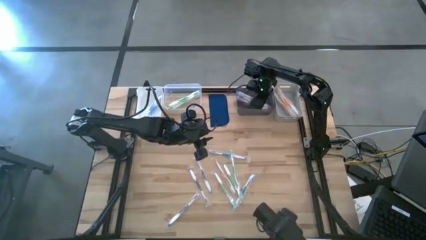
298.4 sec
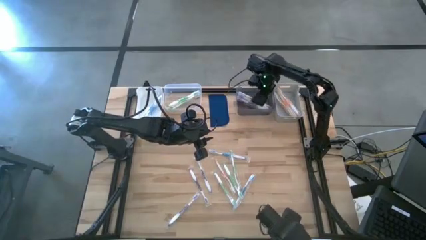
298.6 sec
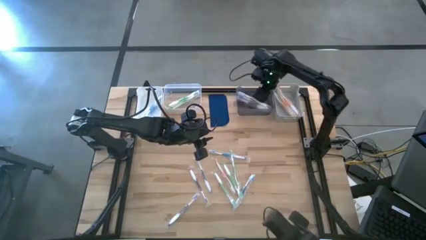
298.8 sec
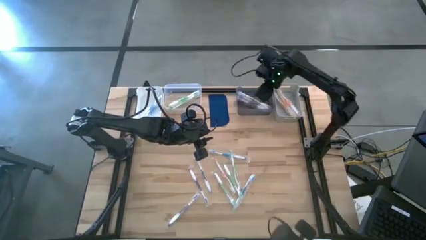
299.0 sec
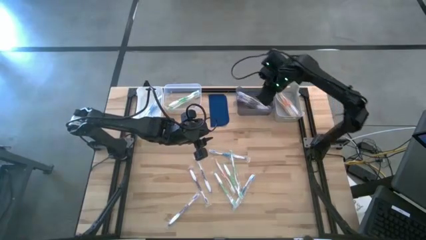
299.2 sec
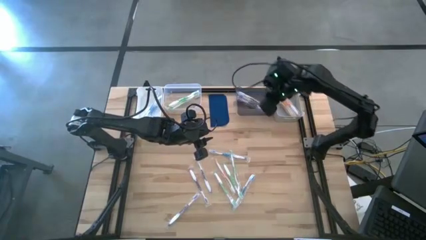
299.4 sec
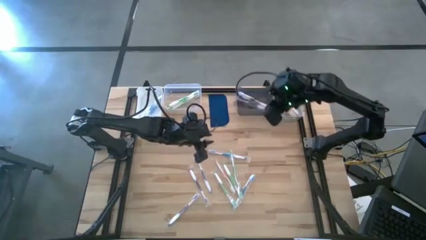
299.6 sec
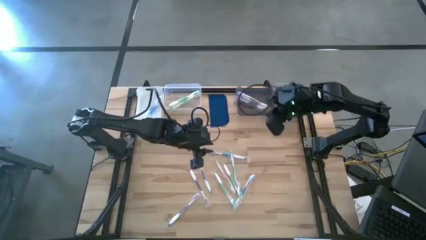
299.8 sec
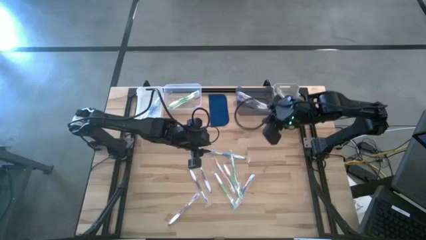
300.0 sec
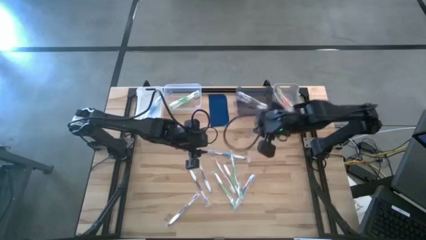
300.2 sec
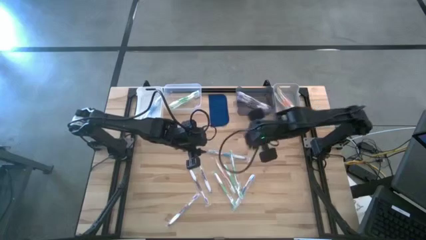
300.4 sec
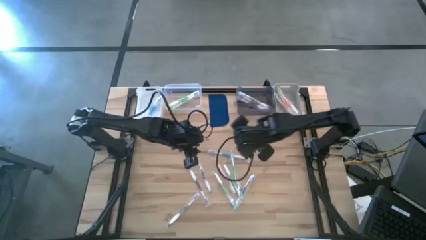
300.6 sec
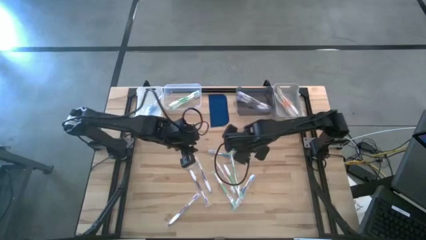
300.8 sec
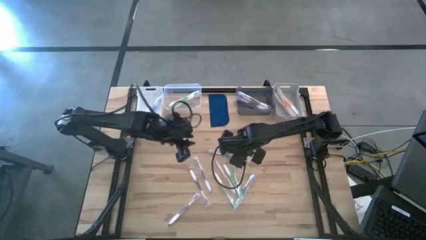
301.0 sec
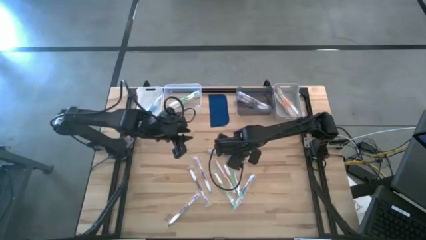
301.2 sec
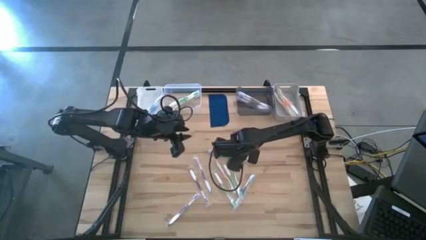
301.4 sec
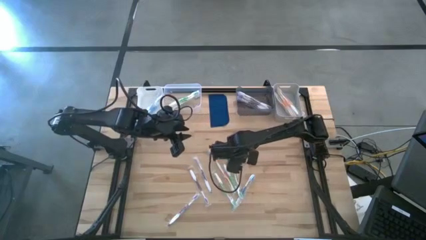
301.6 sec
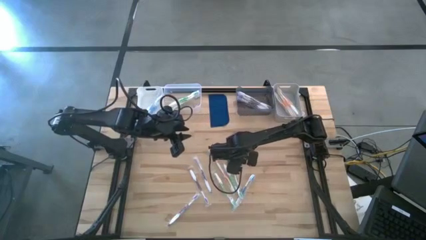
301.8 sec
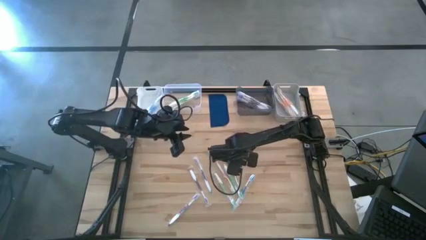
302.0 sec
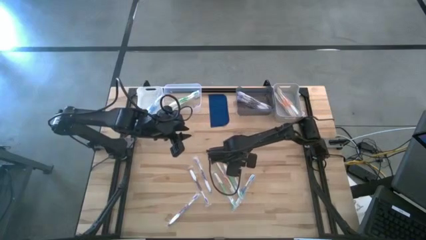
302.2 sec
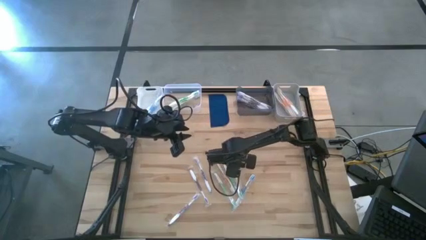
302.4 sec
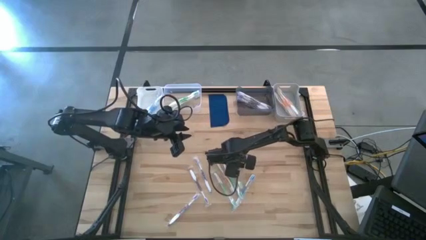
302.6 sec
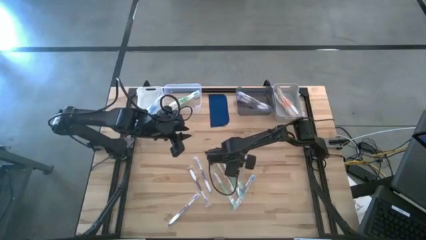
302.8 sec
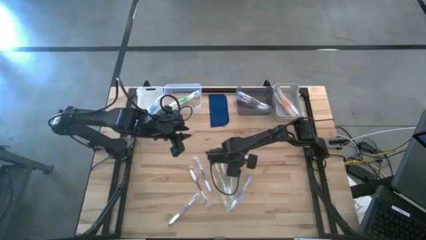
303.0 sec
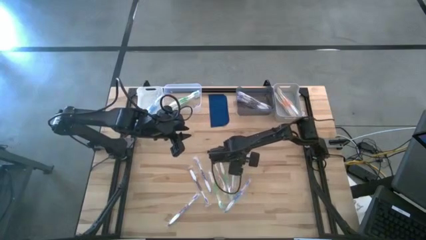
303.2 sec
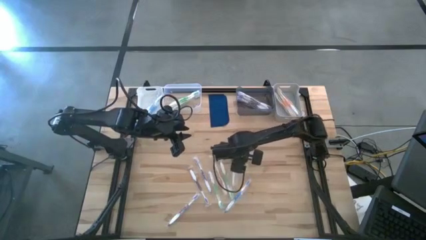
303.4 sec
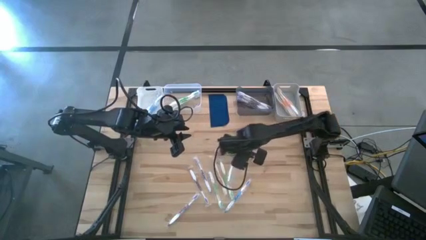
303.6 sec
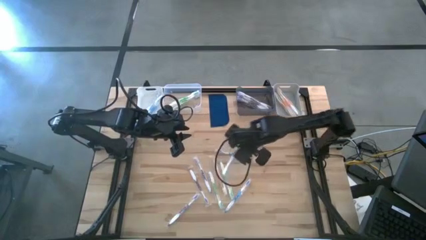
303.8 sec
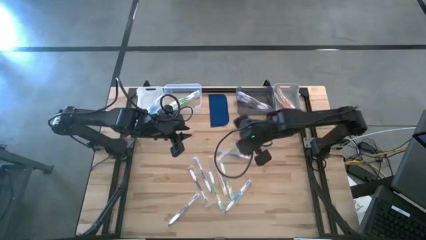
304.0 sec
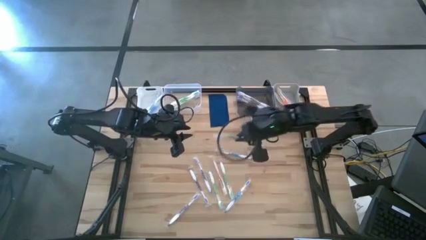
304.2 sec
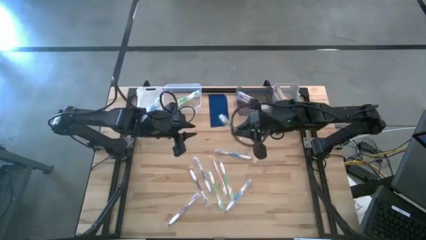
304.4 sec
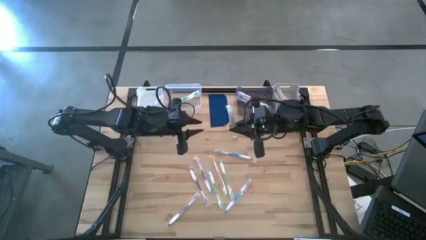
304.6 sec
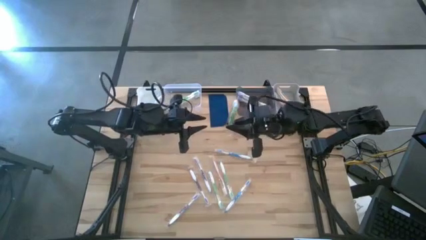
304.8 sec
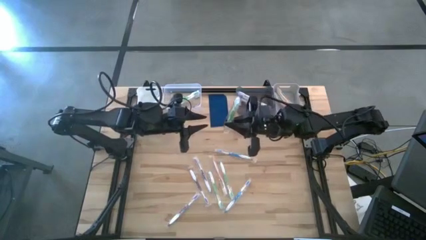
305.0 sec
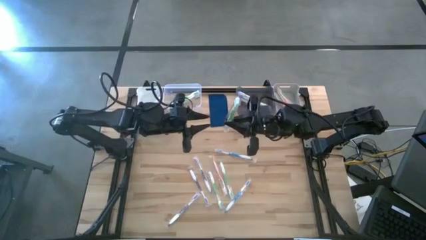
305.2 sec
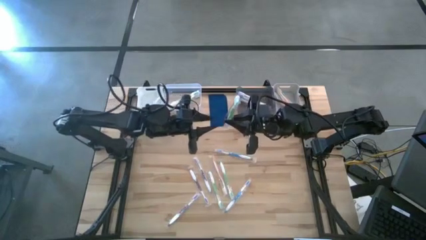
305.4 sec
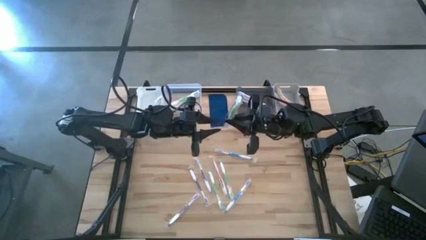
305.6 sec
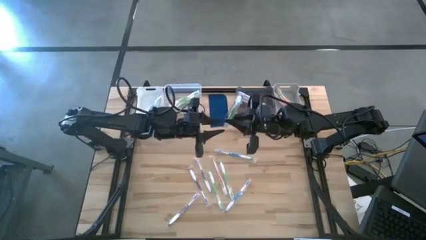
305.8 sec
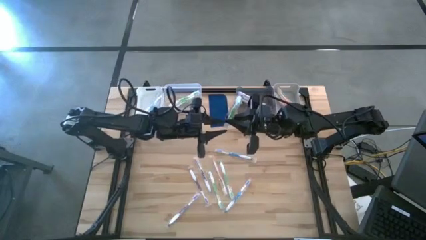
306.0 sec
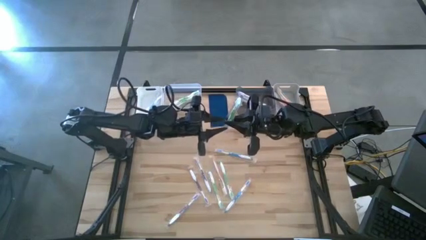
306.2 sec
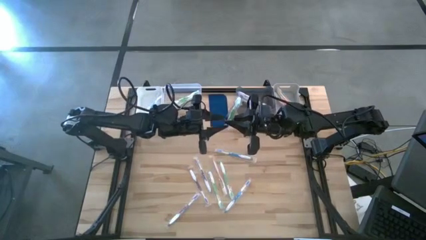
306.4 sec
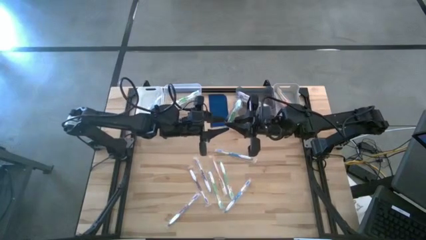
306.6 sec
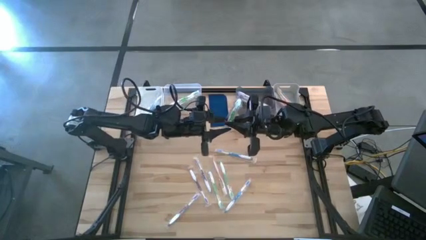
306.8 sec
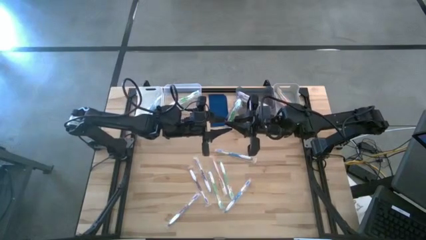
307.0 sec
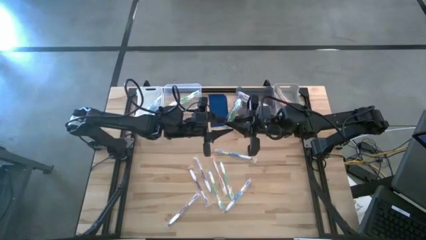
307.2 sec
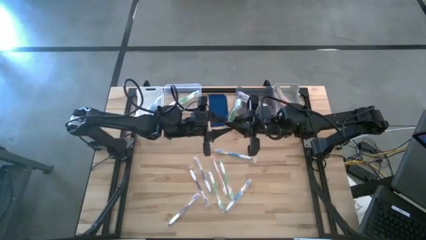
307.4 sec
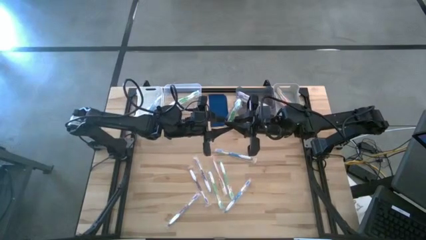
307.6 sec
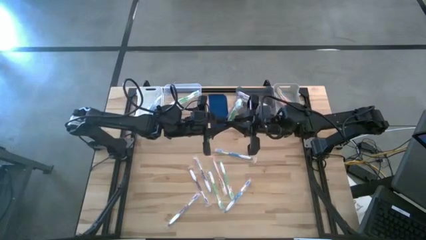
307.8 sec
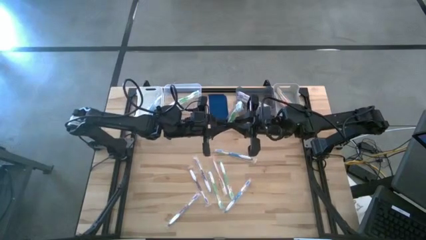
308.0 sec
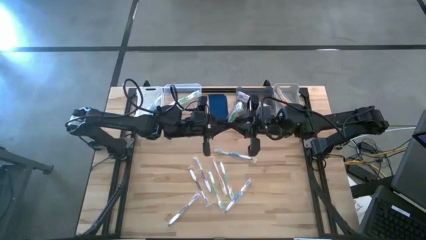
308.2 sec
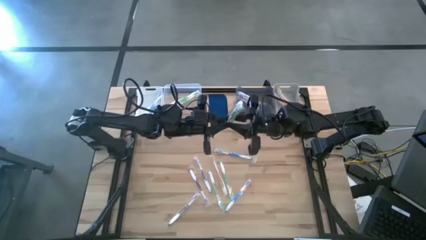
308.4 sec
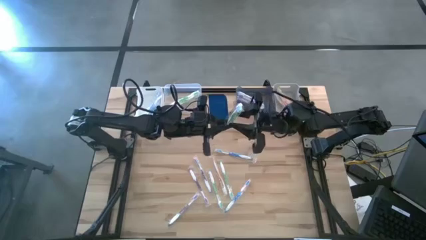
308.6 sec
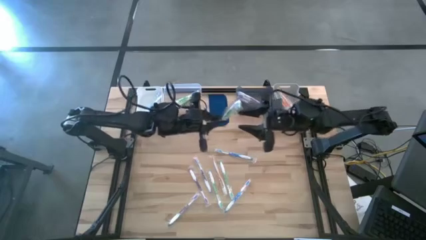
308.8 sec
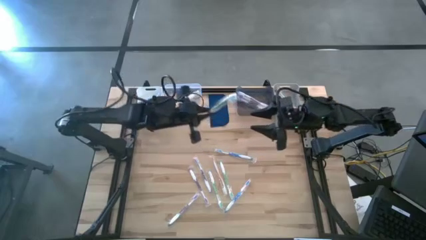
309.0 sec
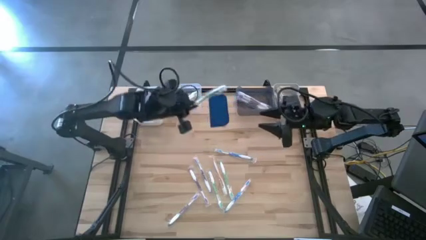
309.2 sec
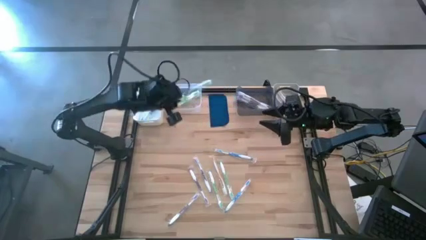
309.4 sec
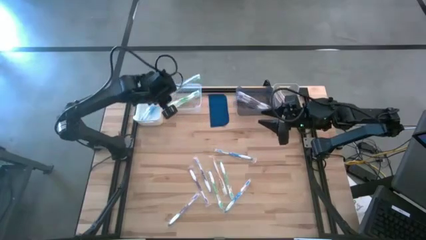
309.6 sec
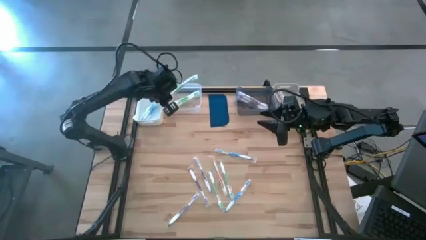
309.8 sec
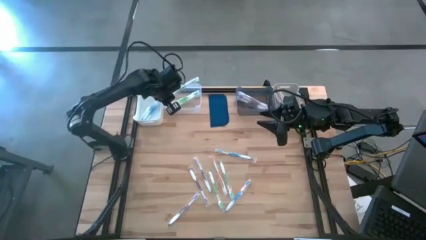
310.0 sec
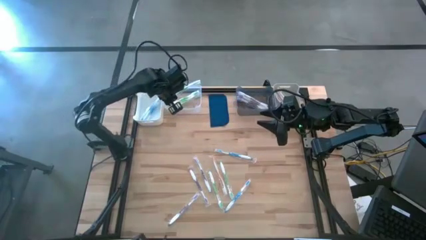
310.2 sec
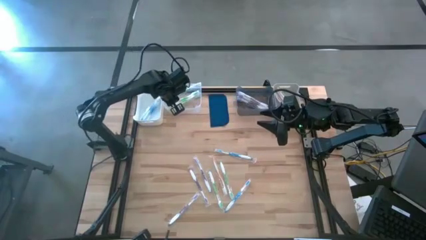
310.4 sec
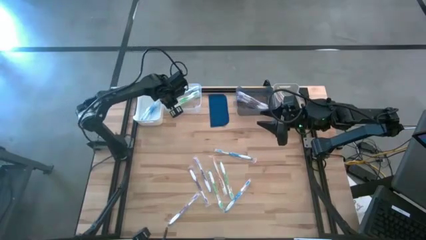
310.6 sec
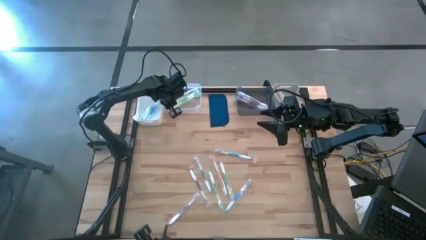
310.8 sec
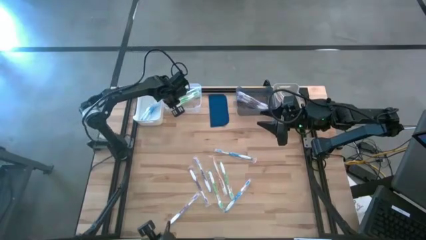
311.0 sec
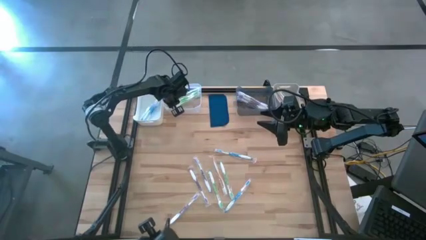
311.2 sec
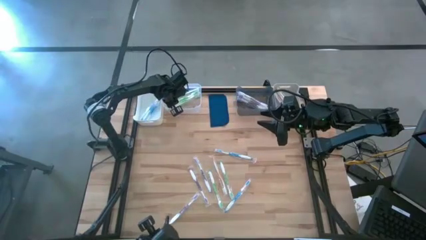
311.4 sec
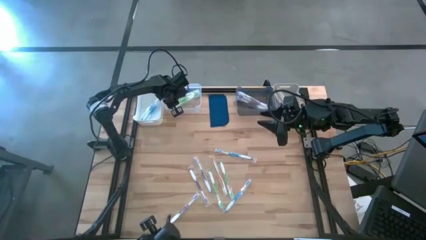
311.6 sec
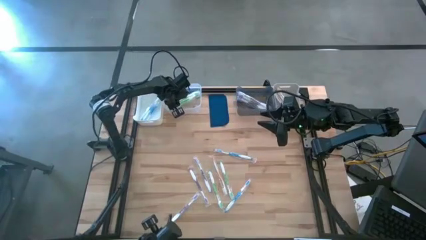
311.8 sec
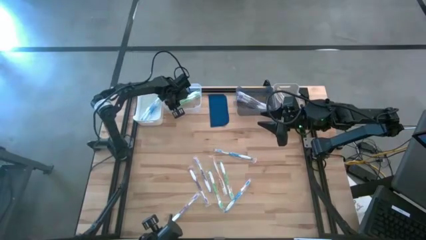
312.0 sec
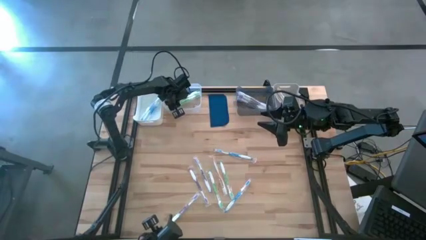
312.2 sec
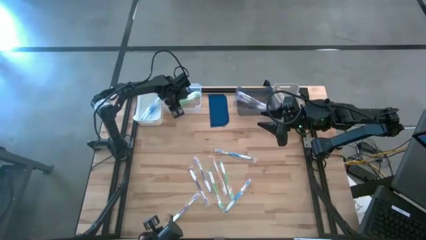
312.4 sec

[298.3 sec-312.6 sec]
Task: Pick & Place Toothbrushes
Put the green toothbrush into the transparent bin

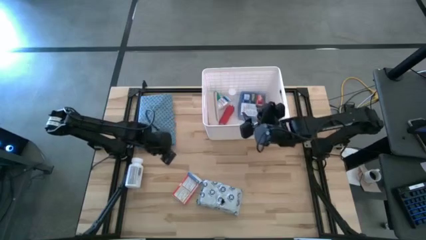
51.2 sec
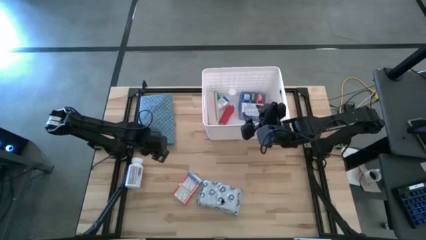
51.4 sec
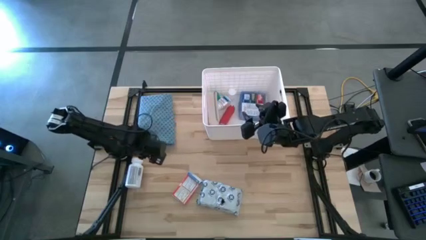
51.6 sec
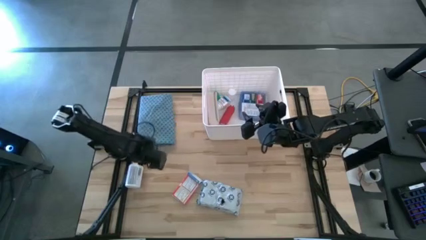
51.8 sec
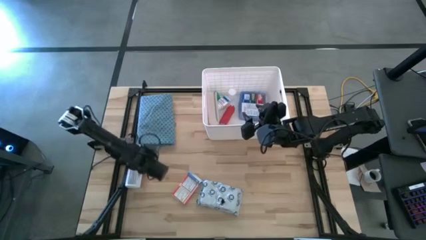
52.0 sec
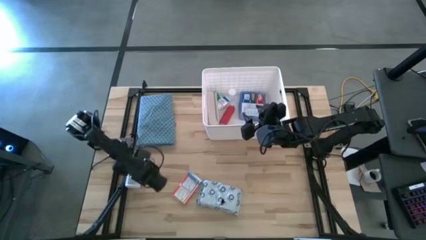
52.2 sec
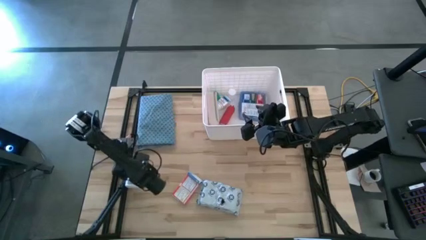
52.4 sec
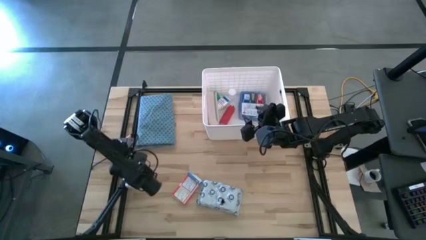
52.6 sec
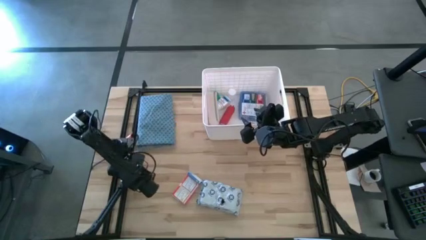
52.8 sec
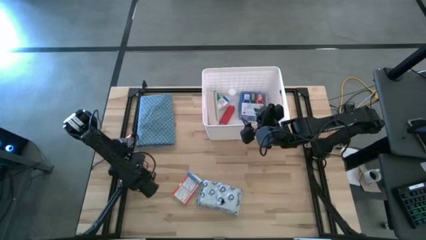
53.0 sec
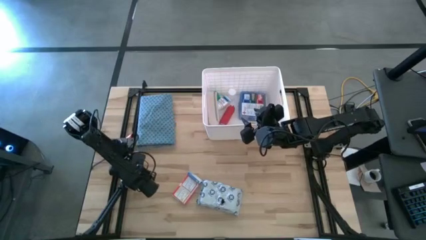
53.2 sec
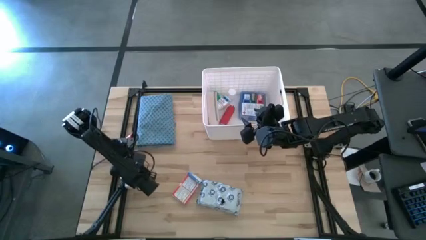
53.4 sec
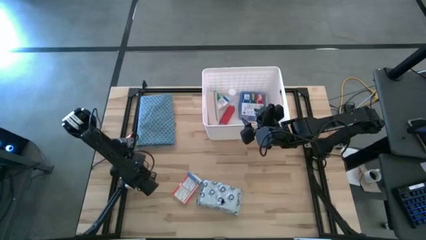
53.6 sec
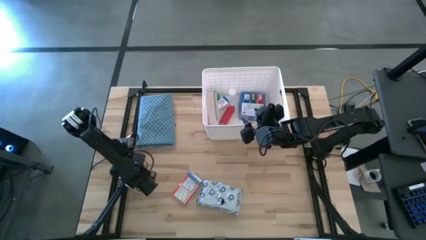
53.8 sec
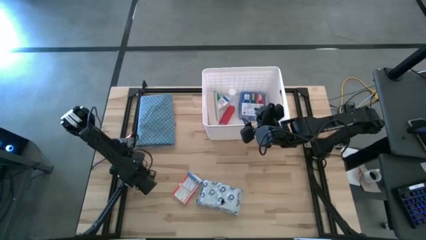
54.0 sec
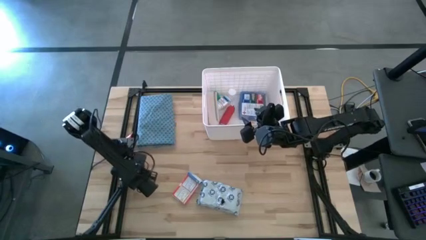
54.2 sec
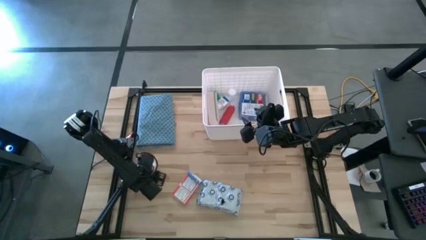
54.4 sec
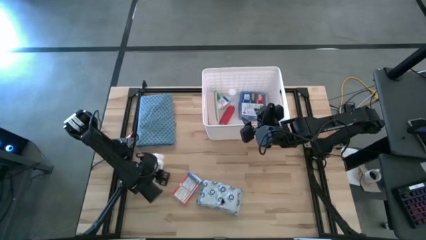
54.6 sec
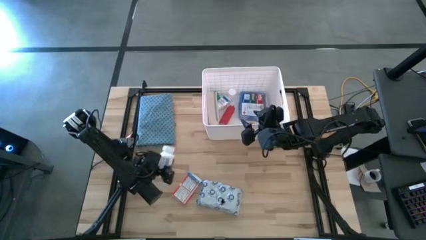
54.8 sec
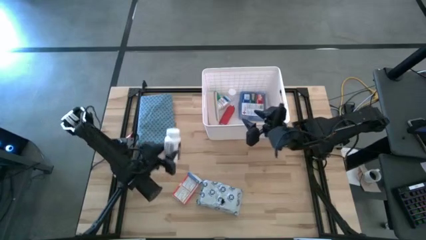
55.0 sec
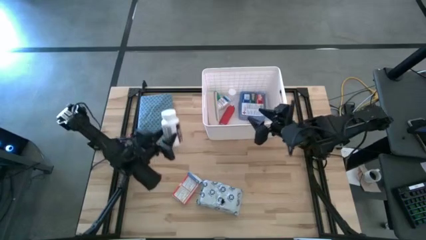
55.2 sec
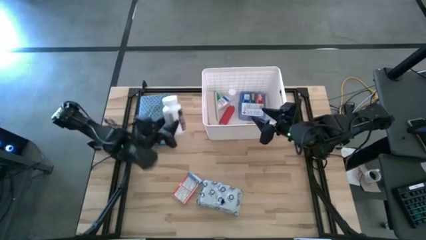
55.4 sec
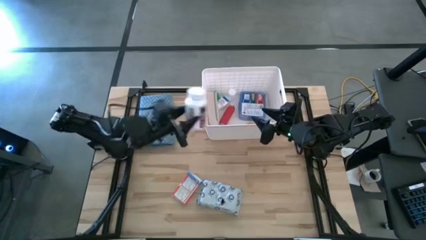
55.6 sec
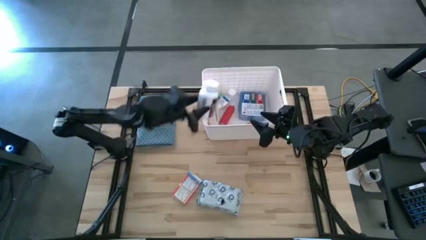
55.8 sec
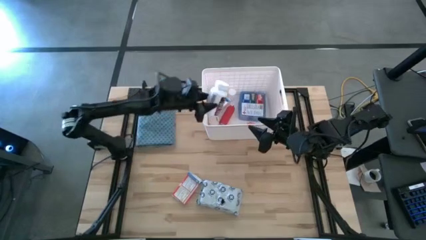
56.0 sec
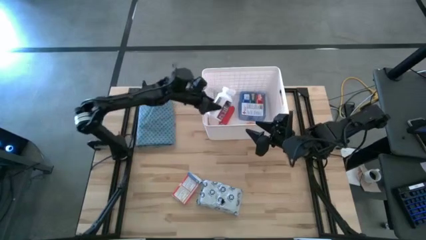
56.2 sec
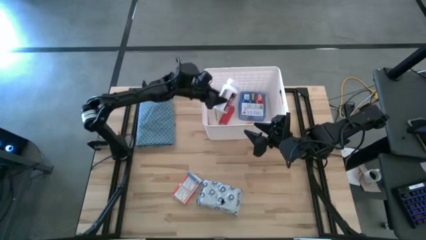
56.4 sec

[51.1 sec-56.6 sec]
Task: Pick & place medical supplies in basket/bin
Put the white pill bottle into the white bin
